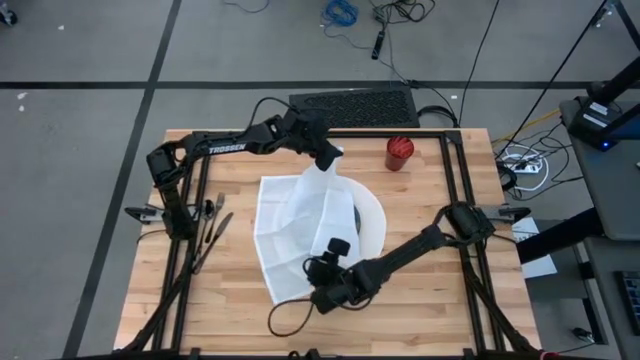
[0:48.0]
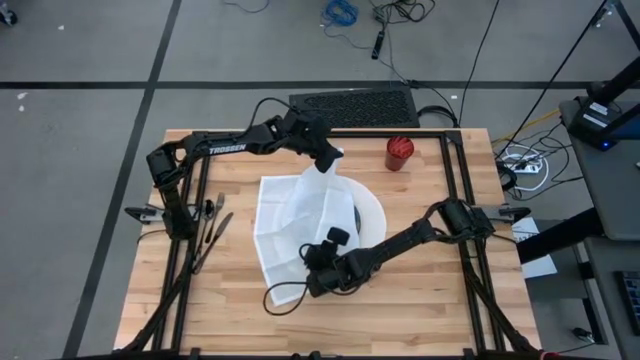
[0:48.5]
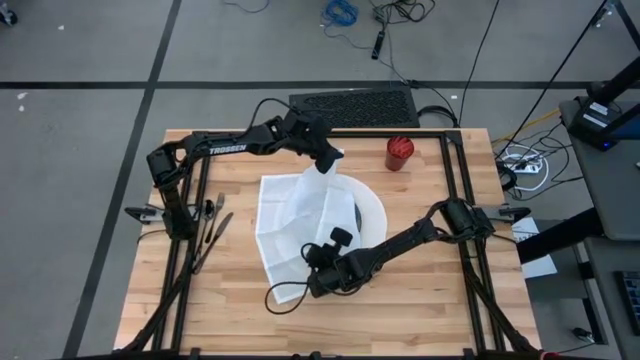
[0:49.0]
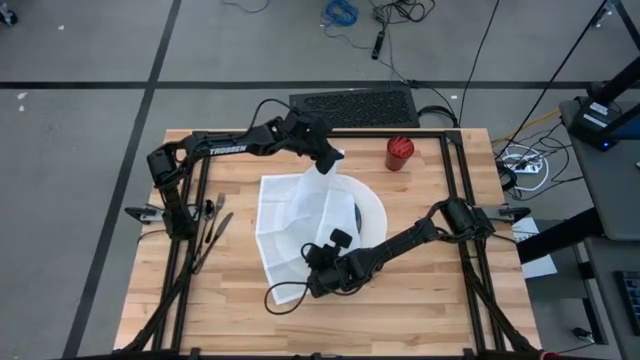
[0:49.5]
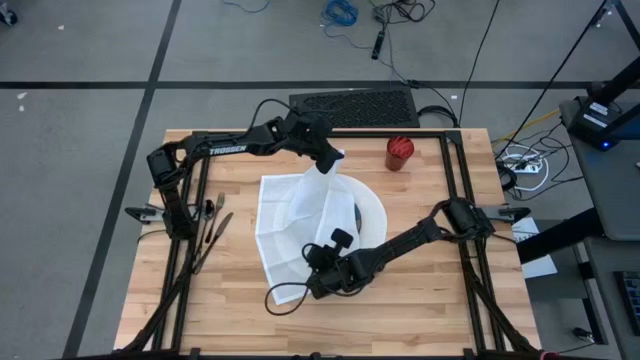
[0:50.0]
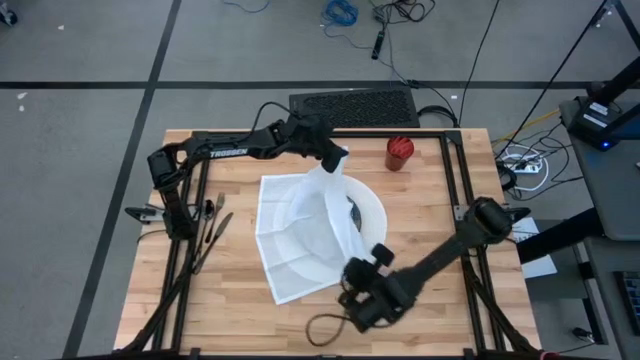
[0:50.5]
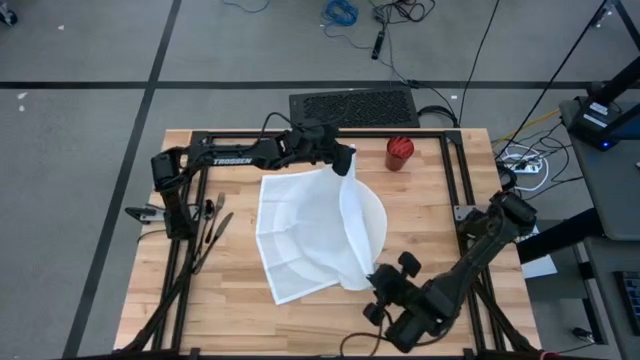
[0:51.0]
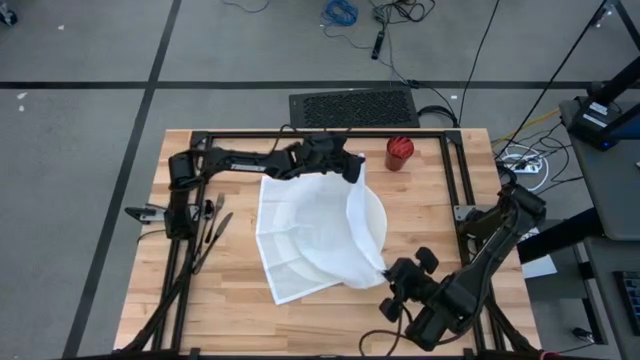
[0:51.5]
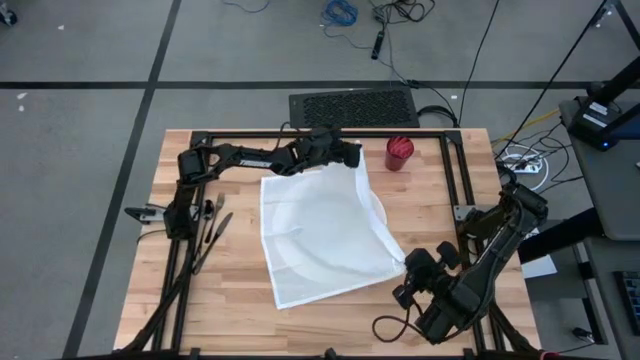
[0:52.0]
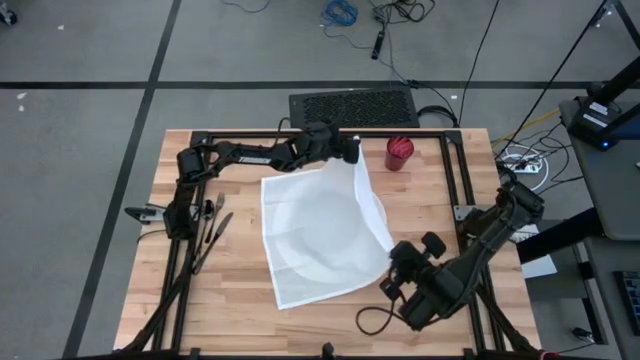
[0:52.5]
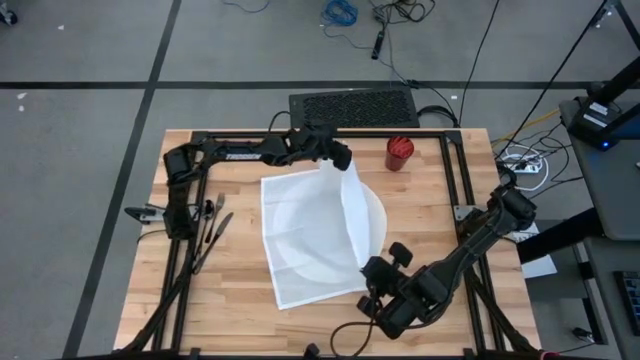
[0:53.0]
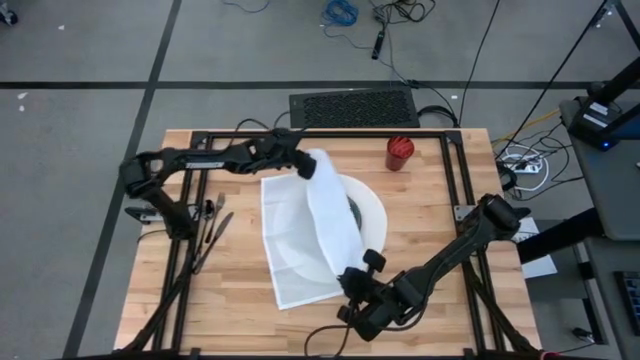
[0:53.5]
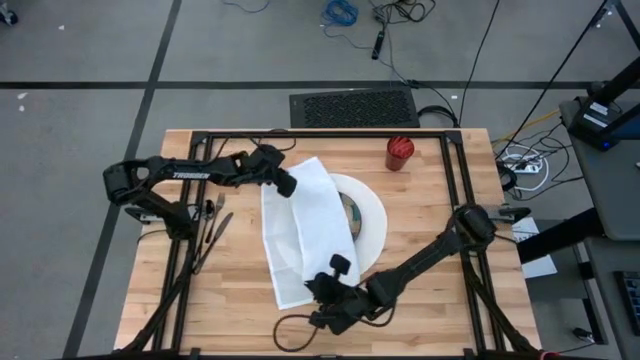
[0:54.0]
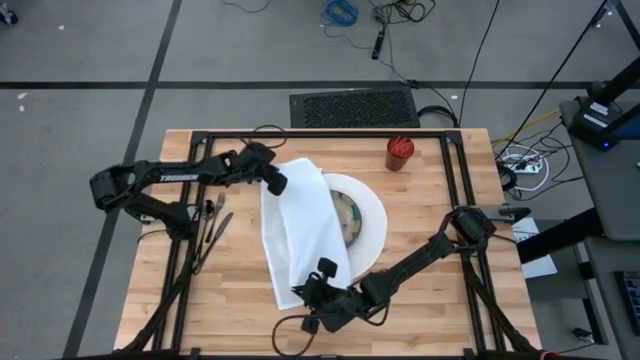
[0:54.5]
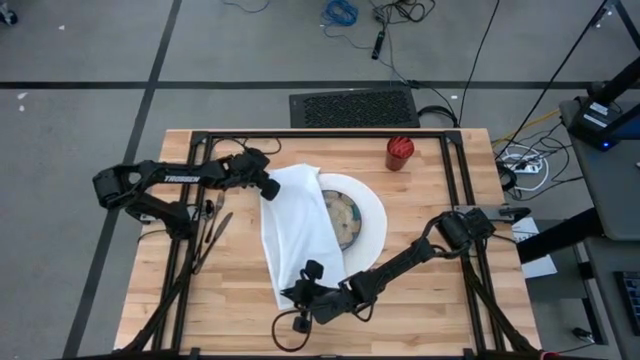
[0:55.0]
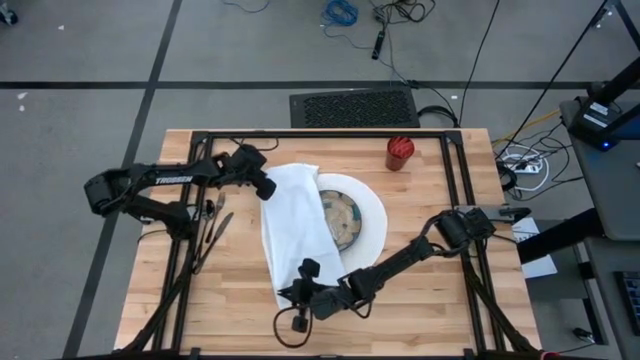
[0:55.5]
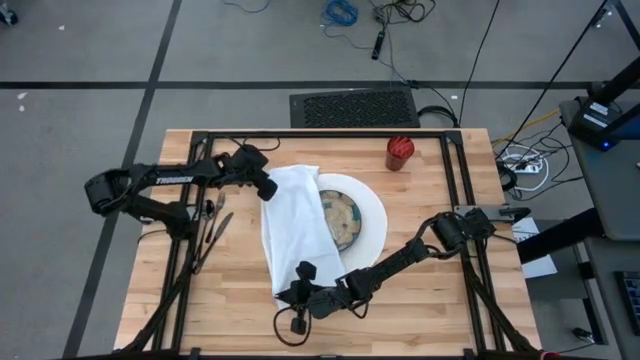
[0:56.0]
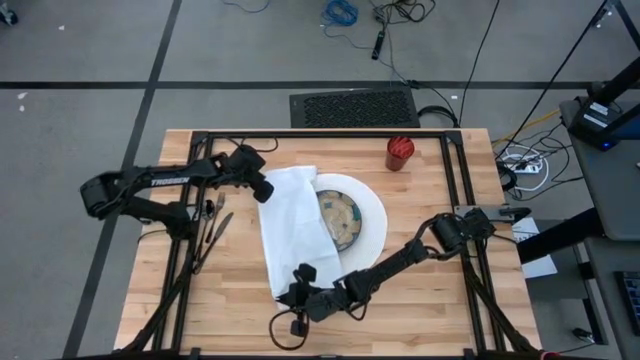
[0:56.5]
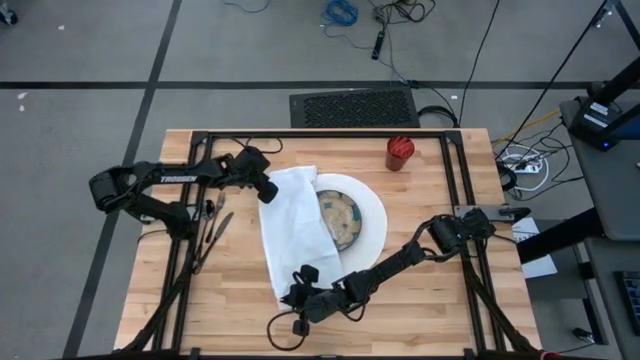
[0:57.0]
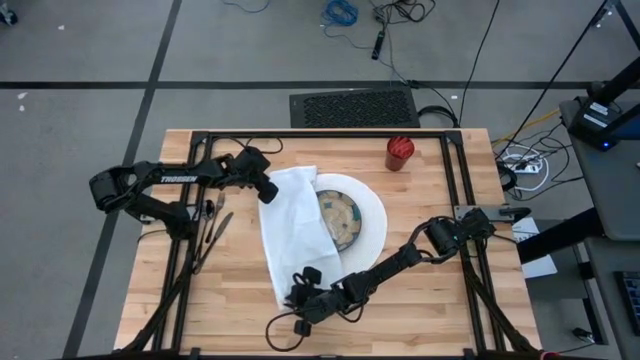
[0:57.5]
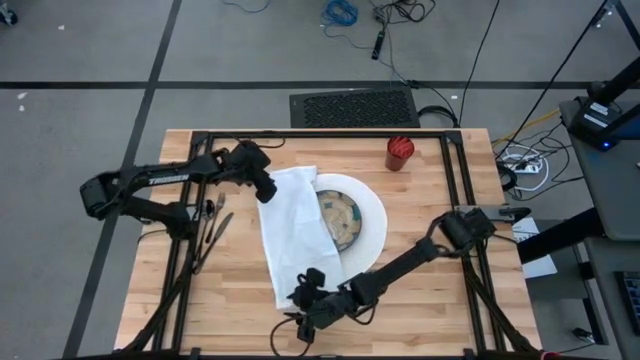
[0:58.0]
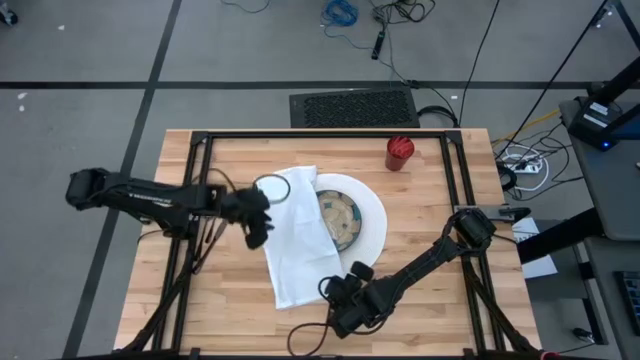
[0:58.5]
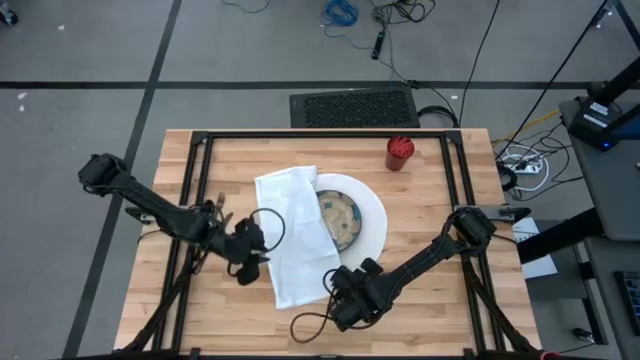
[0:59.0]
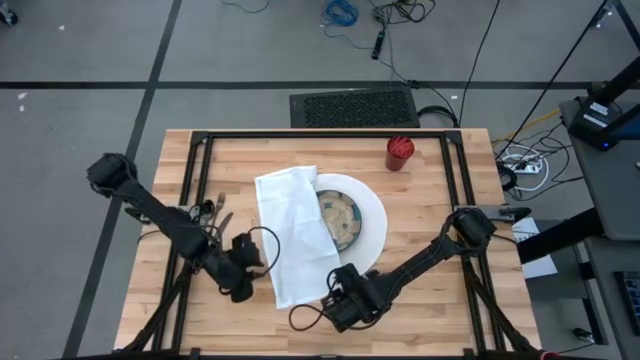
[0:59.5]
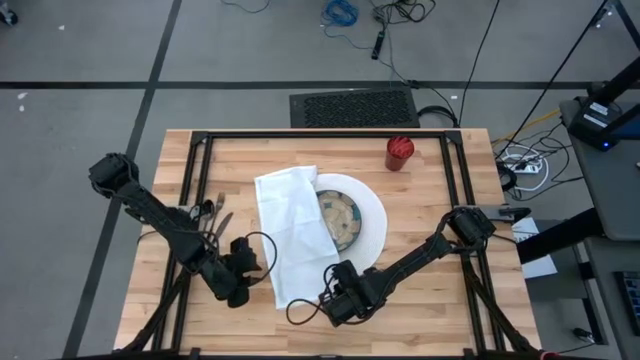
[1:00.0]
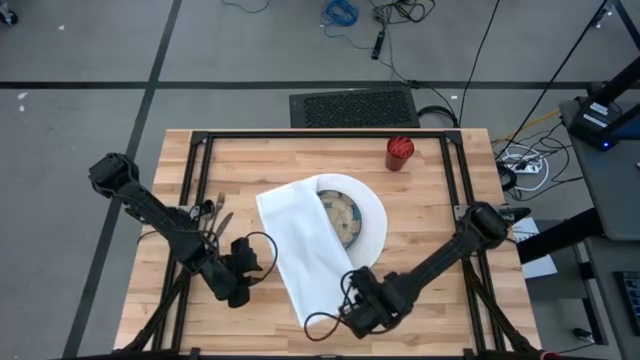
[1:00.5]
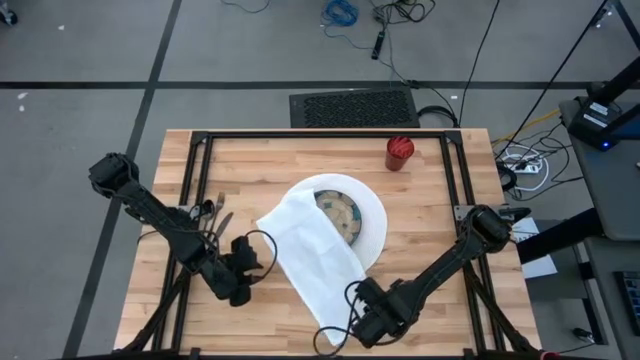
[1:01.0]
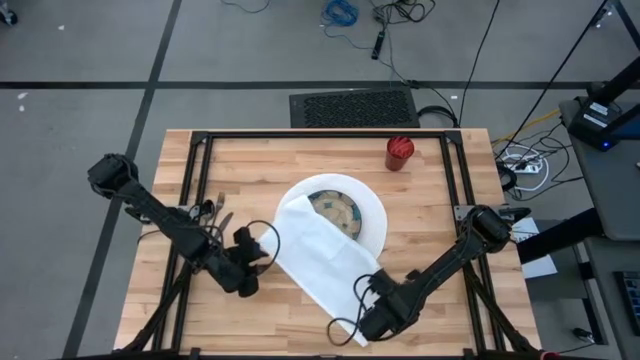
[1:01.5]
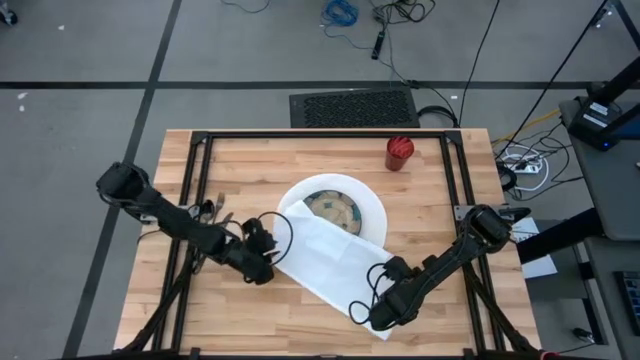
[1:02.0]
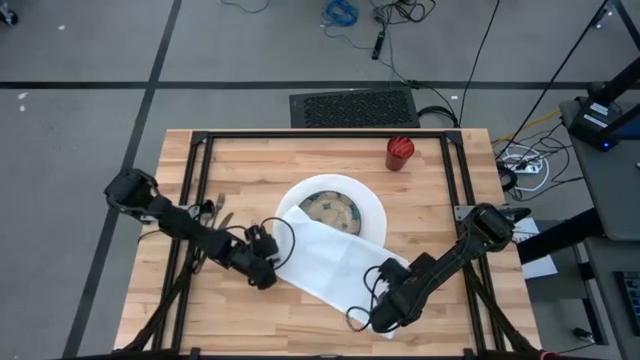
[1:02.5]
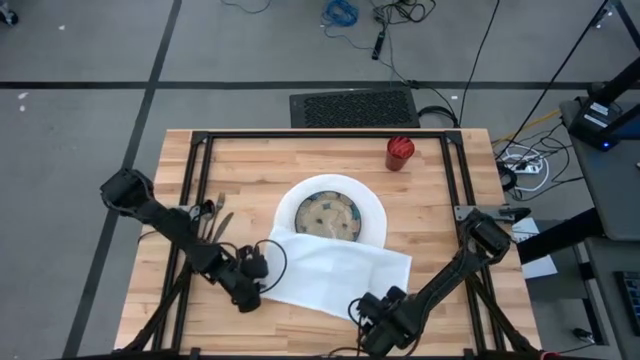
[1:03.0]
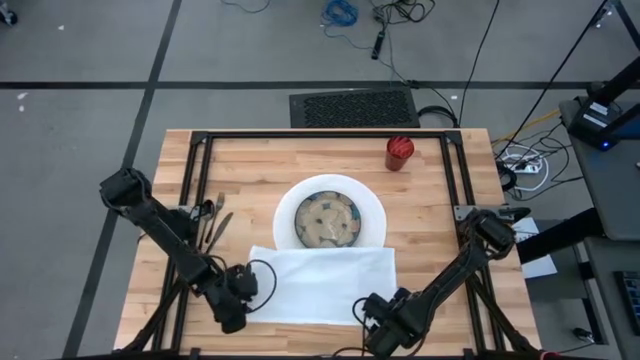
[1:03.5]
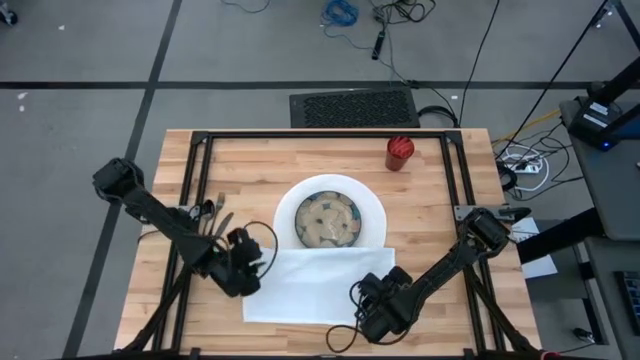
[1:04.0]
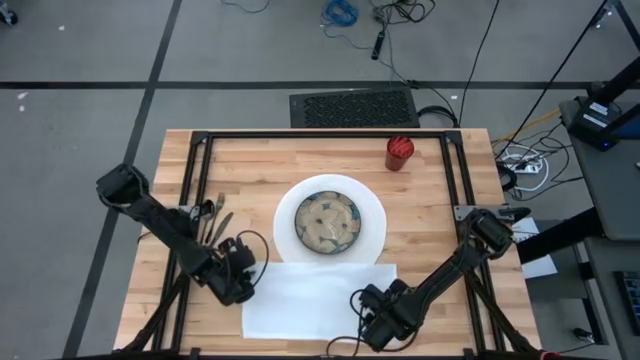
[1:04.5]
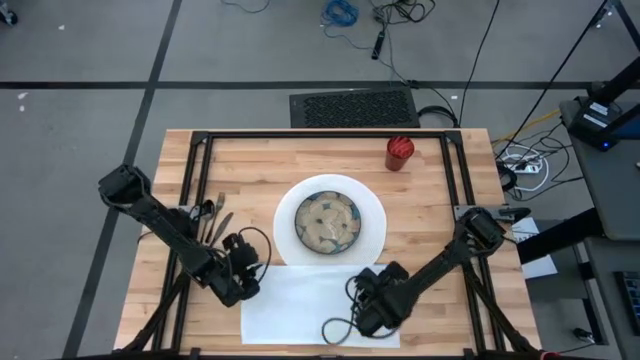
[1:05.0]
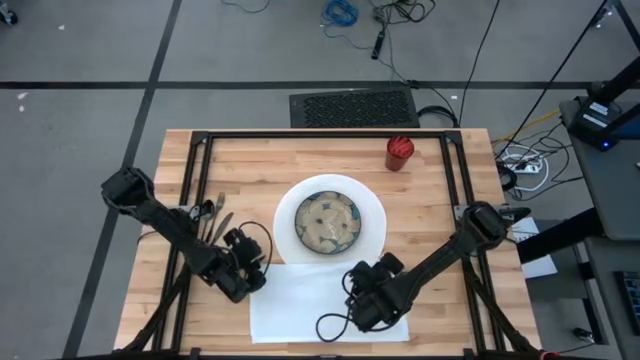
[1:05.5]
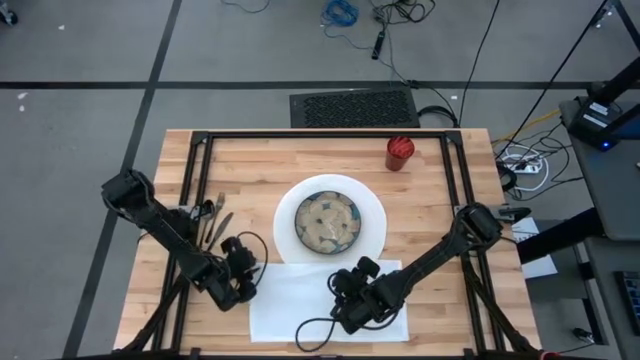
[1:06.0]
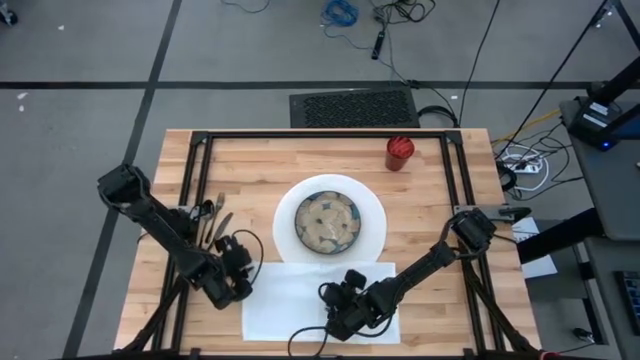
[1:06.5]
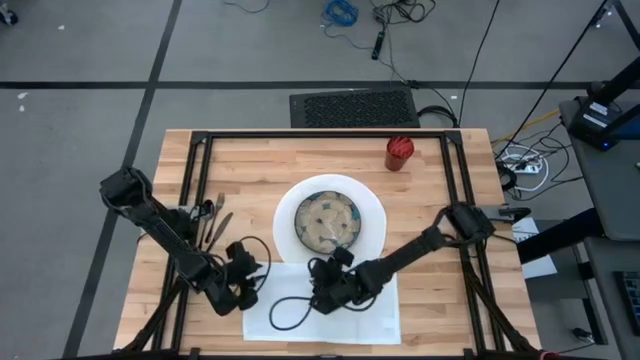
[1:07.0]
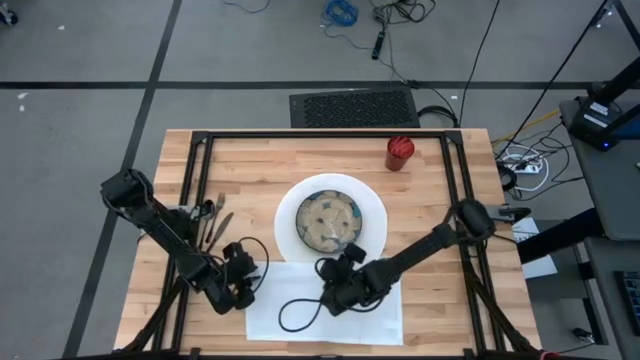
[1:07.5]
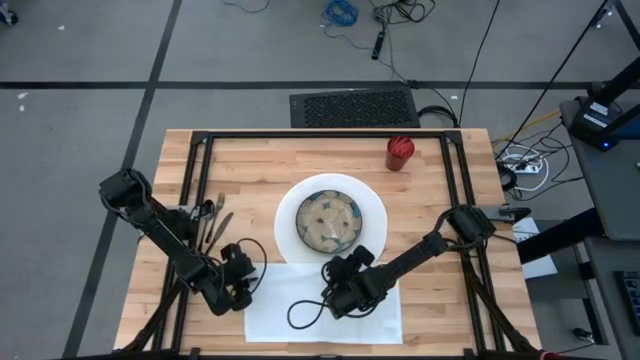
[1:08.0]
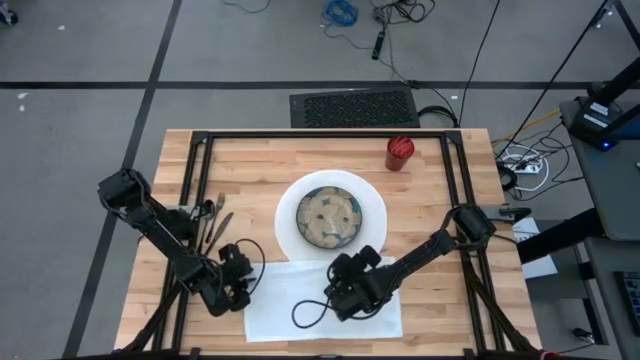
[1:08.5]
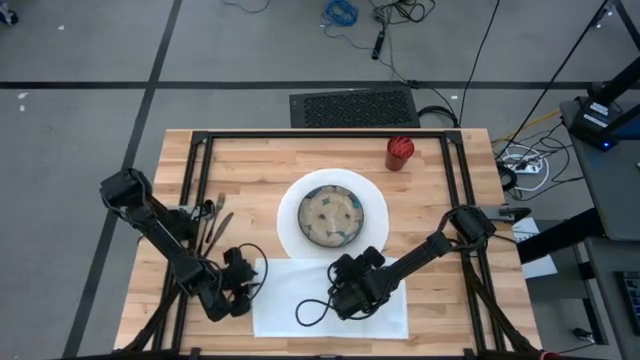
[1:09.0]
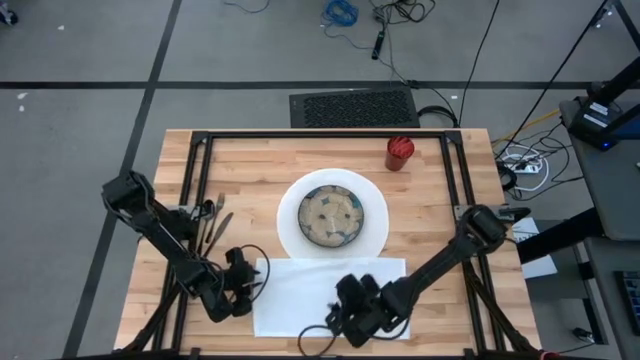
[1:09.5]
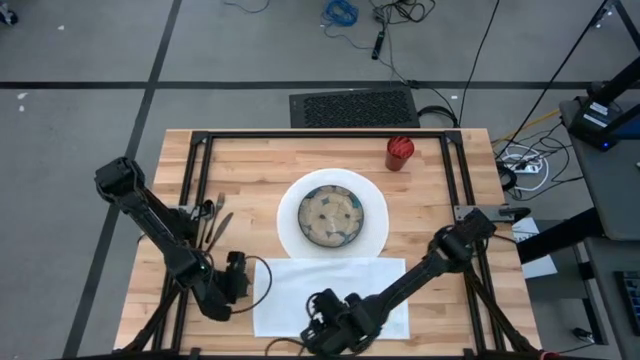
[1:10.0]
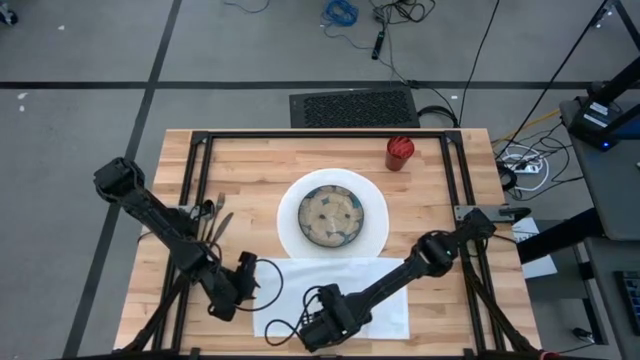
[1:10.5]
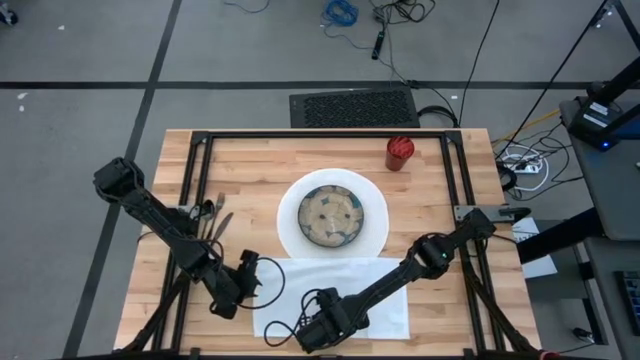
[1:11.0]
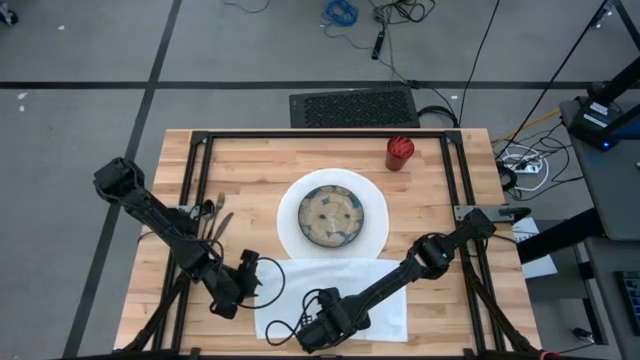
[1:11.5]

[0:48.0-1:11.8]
Task: Set table place
Fold the white table napkin
